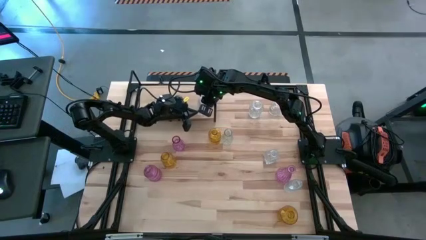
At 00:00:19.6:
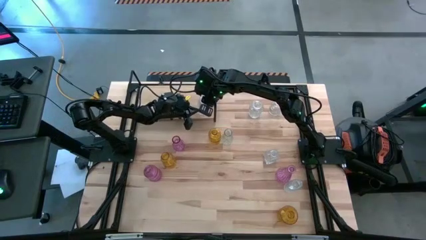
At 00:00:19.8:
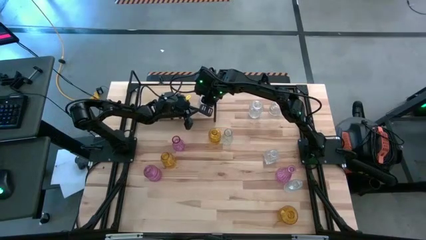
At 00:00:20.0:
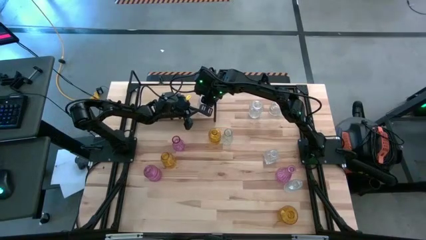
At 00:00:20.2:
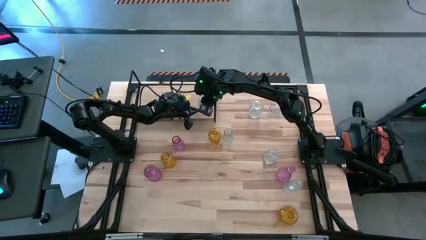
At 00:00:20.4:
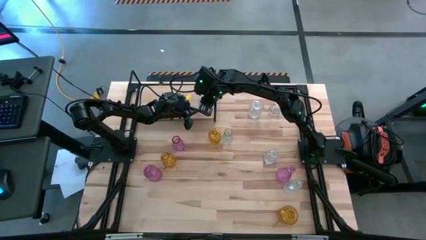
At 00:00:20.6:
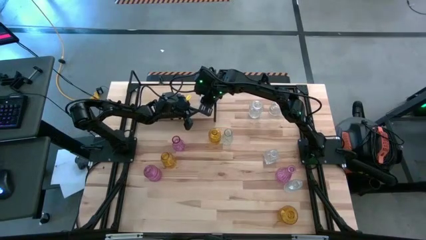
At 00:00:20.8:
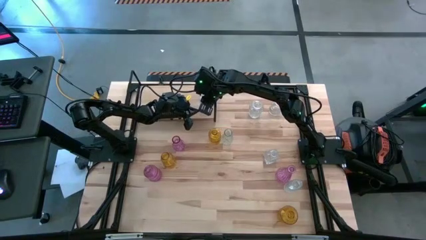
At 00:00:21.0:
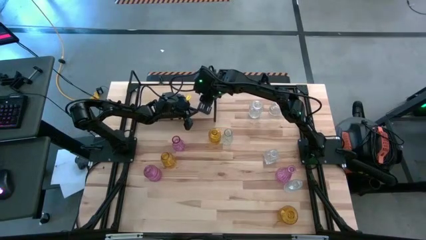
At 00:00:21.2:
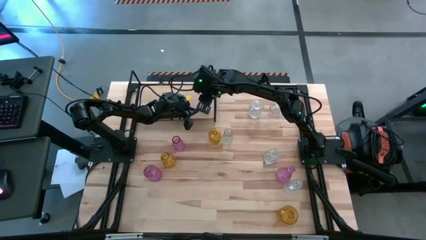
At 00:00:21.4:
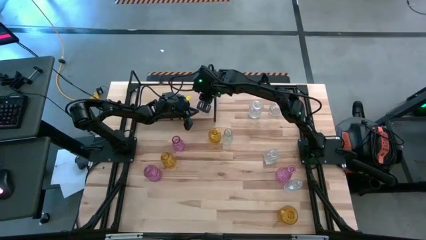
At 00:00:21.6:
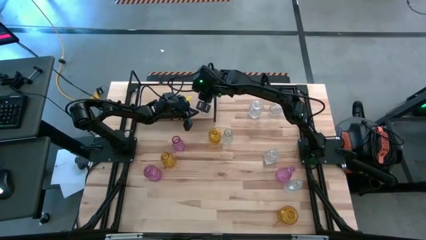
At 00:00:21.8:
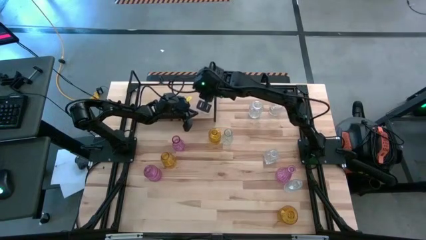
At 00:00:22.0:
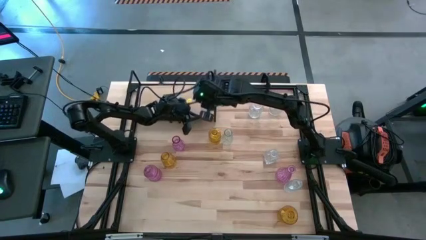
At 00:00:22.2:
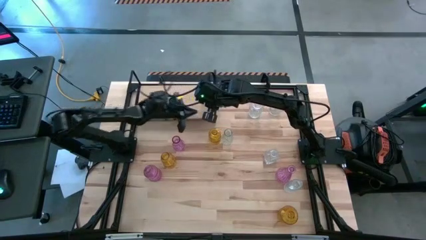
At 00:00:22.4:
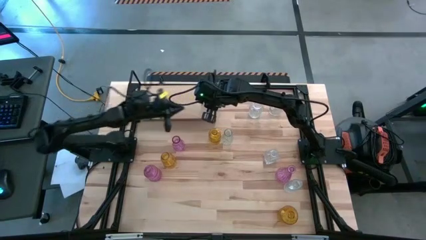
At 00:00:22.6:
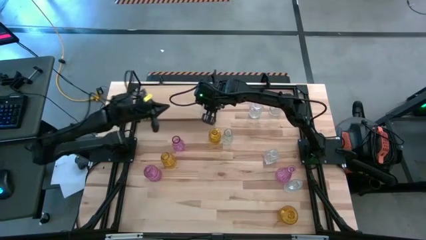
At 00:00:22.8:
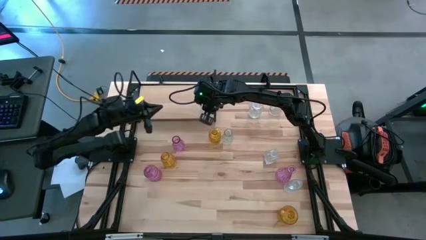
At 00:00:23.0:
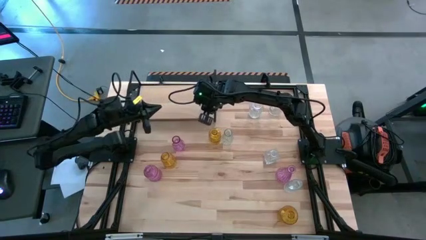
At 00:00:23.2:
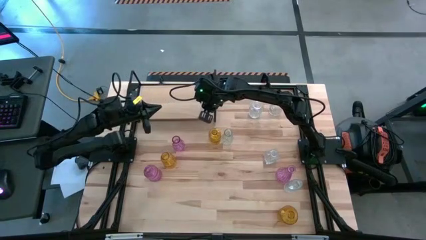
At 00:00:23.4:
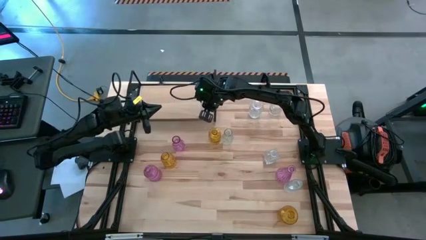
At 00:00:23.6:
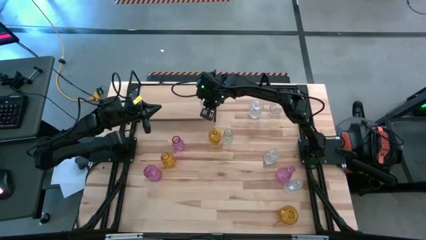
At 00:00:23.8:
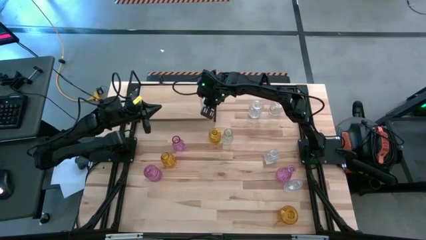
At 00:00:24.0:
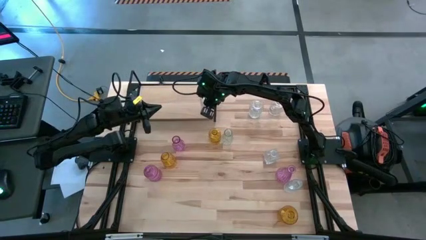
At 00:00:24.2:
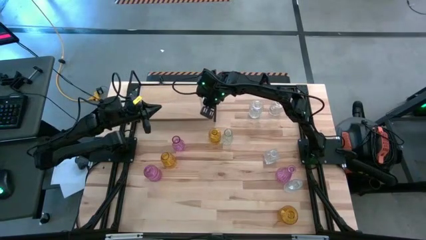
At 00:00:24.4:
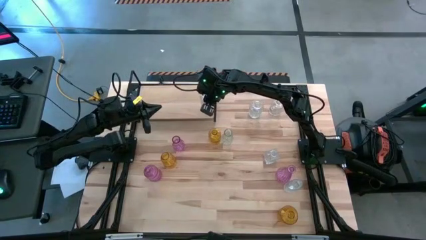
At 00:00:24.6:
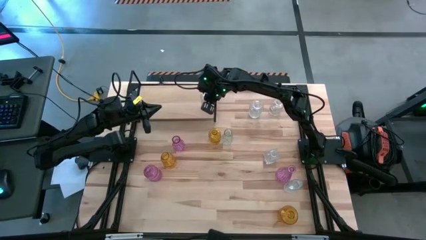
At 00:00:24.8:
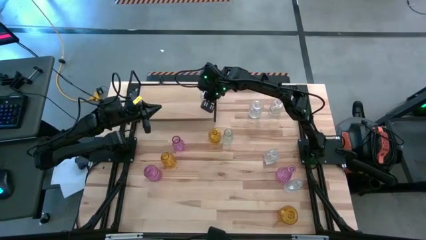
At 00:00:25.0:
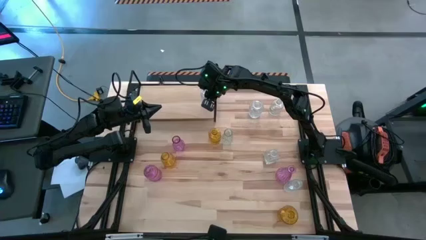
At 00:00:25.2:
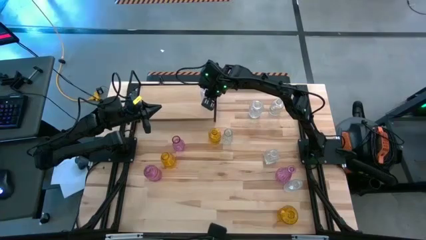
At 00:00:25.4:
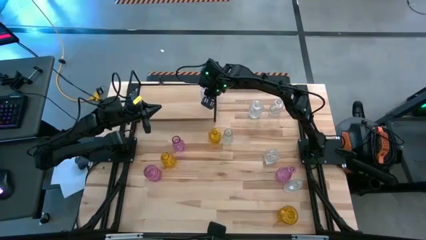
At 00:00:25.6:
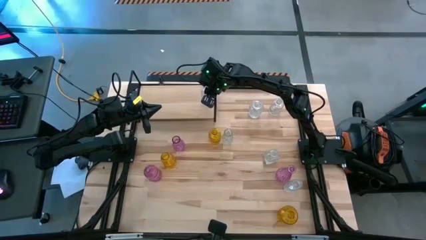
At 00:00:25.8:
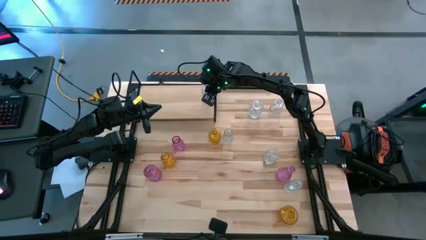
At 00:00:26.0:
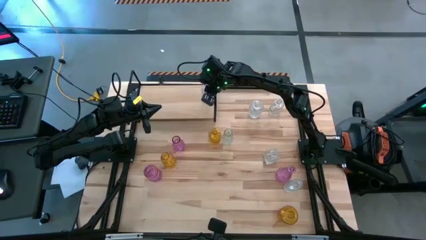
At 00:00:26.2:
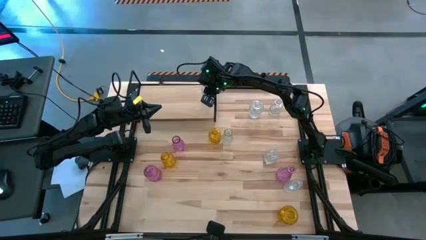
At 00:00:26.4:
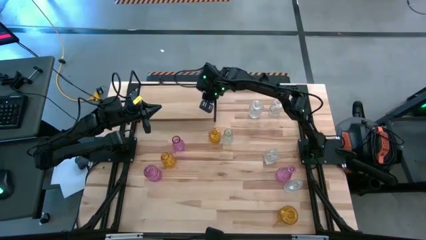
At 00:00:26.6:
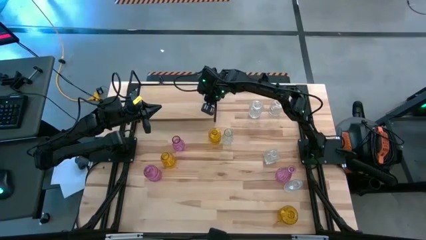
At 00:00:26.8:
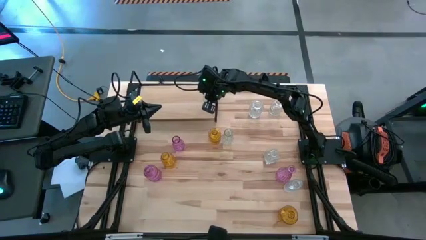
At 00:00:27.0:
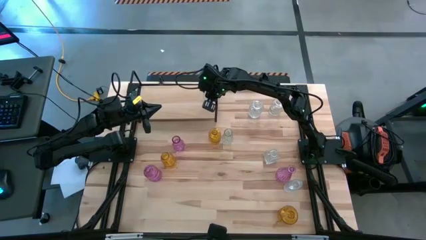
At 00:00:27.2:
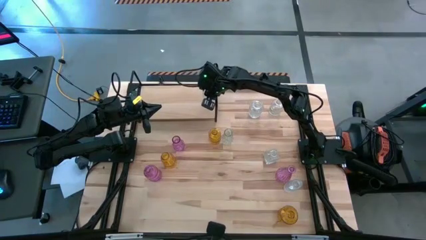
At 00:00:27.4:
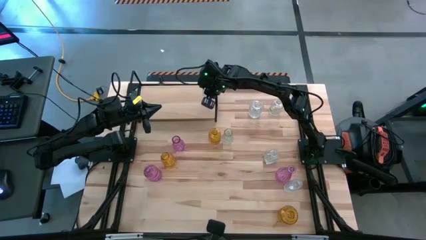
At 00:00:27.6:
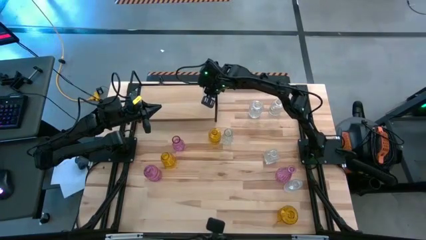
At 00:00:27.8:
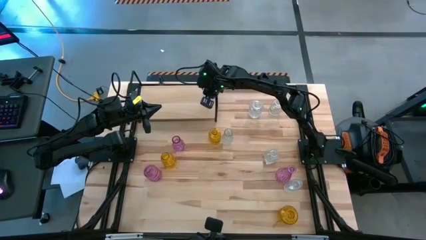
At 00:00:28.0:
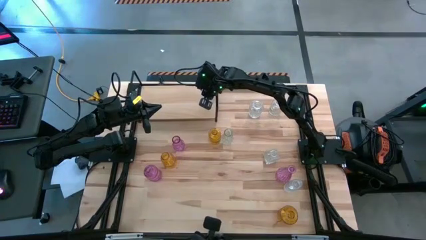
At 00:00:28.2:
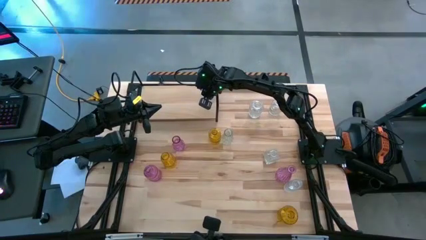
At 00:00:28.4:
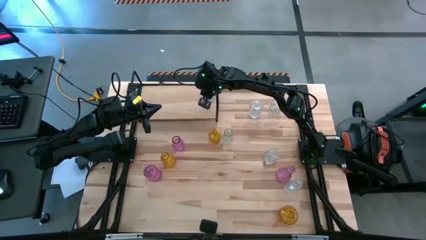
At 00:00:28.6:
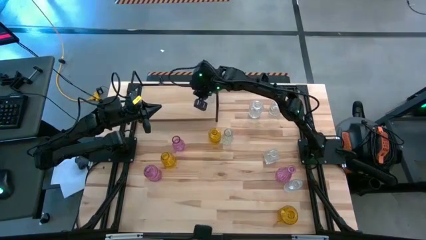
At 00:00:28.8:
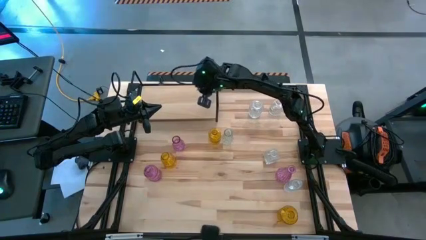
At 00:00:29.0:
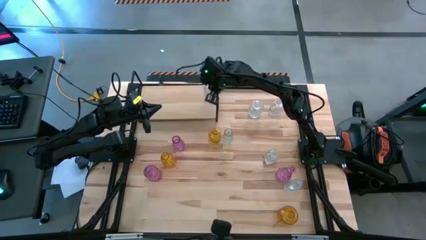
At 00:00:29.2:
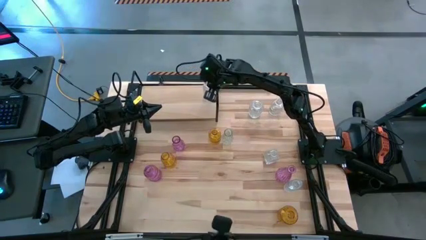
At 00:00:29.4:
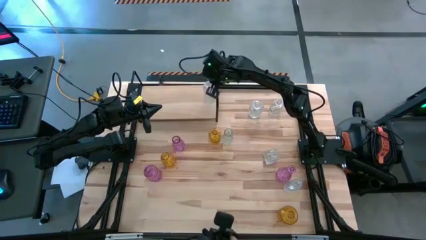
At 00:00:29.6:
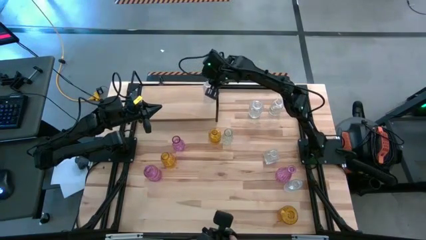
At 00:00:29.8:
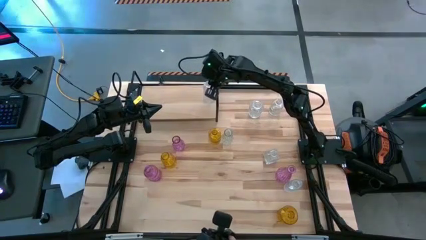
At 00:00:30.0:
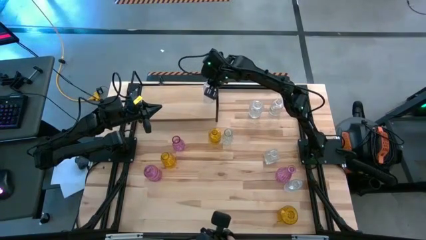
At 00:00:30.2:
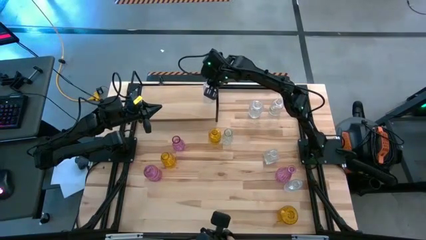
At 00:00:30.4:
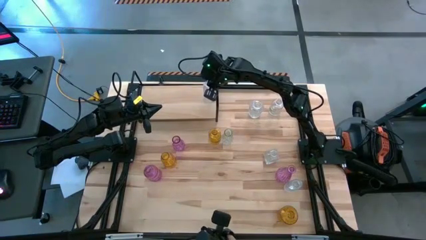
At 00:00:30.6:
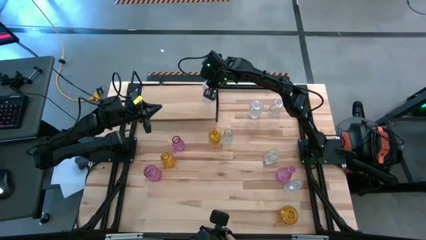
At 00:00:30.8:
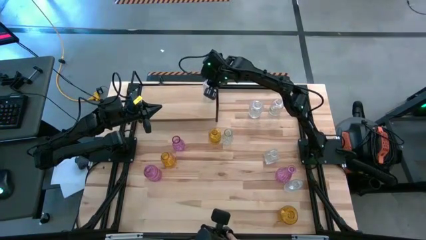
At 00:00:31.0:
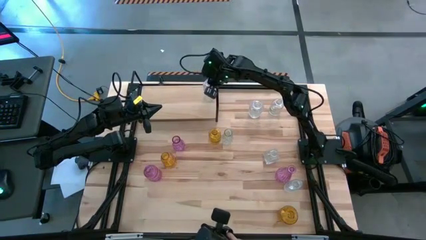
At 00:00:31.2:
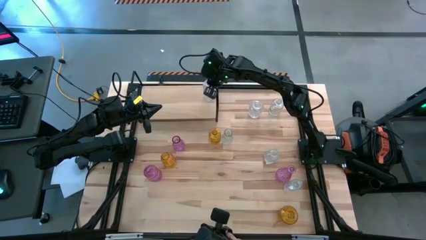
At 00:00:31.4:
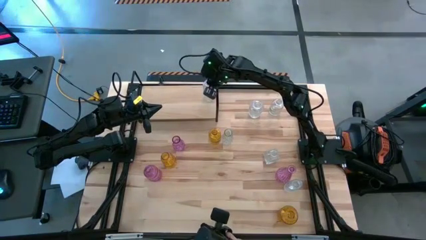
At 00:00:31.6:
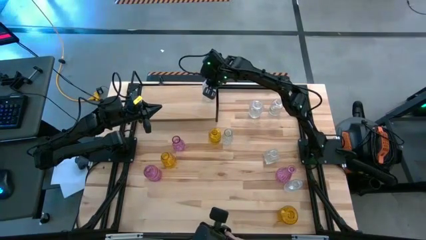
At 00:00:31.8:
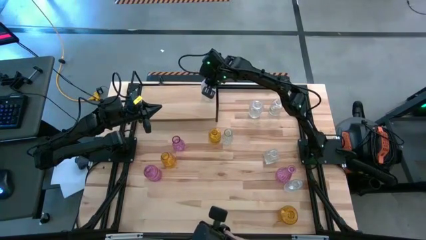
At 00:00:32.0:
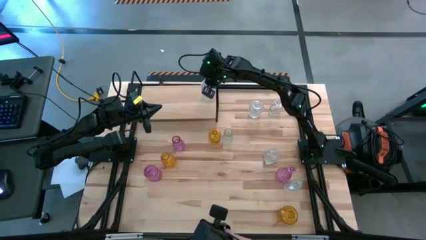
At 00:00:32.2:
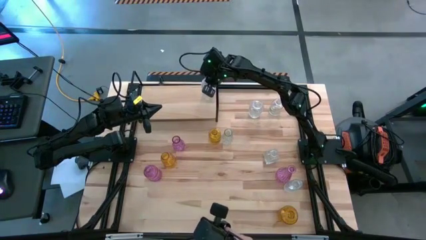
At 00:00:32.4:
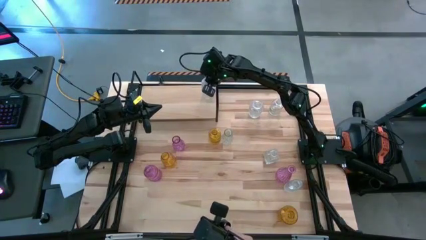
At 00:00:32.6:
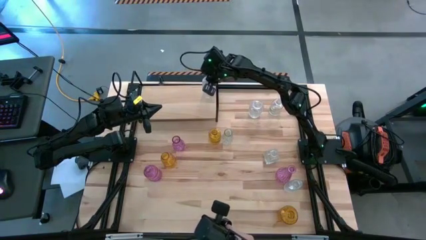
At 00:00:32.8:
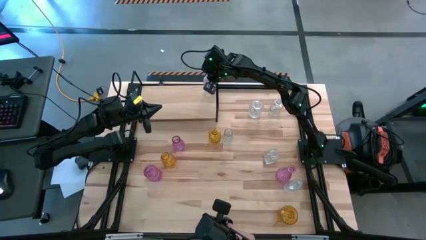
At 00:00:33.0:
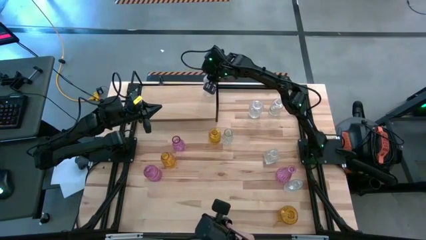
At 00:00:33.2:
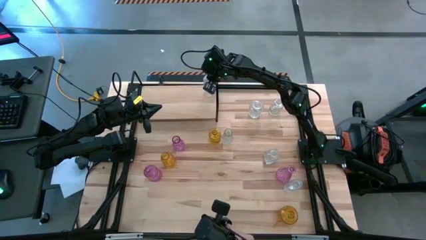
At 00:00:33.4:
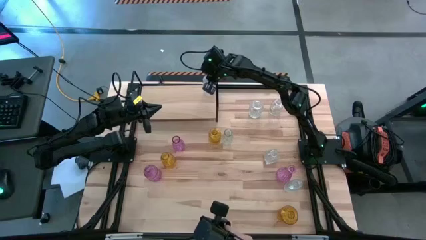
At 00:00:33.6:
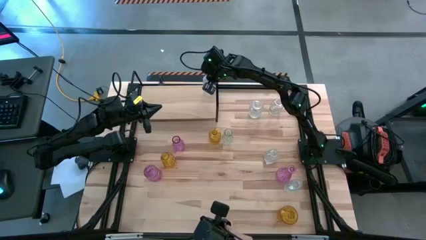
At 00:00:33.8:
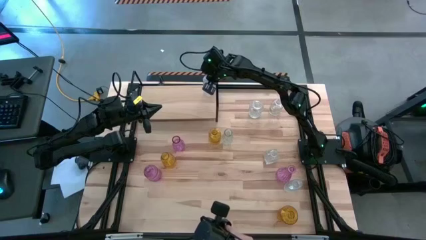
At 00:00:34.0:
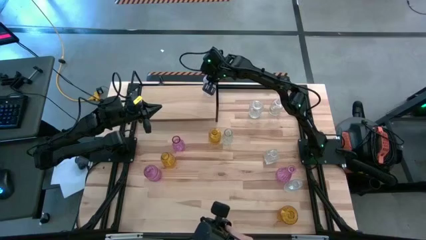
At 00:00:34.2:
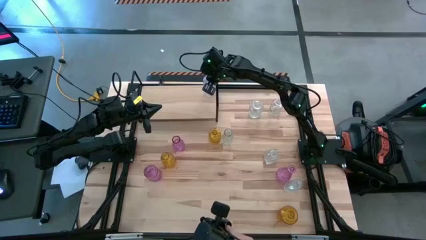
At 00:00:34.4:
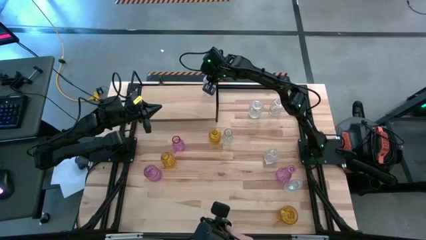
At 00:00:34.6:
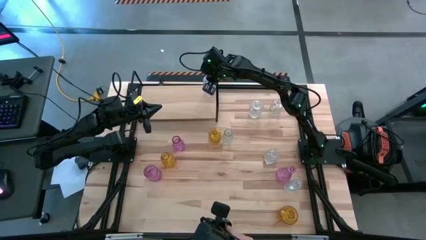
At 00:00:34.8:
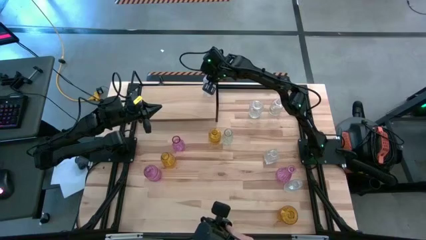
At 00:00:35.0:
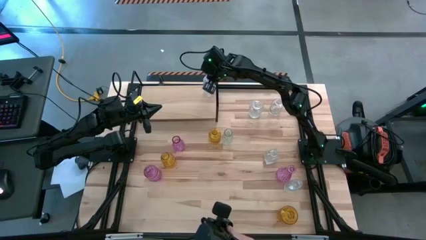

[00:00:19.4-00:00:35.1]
Task: sort vases onto shelf
Put the transparent vase in the top right corner of the shelf
